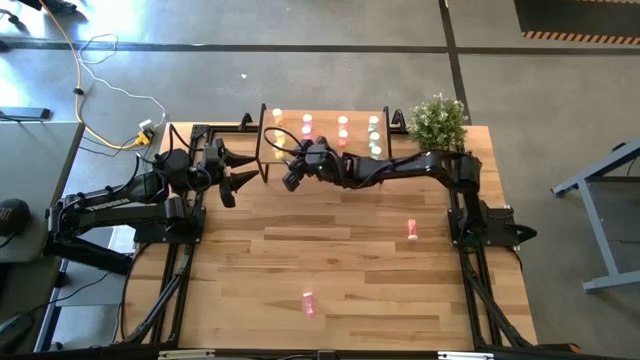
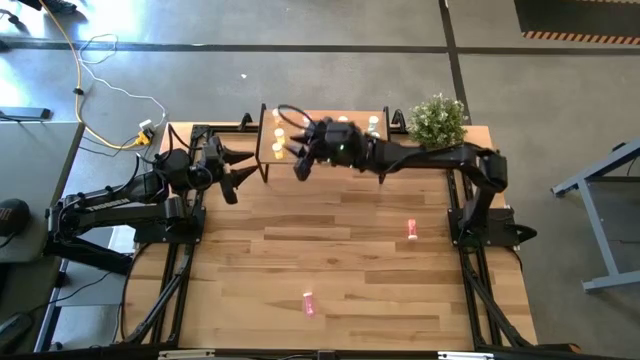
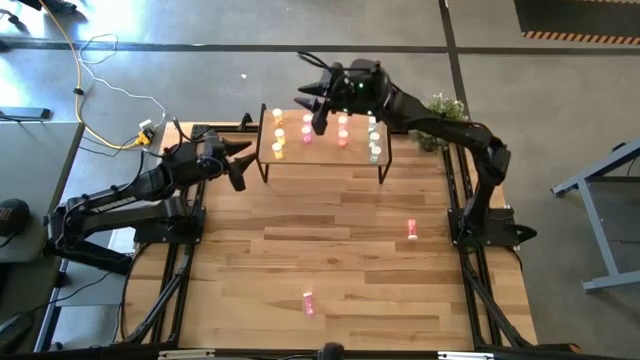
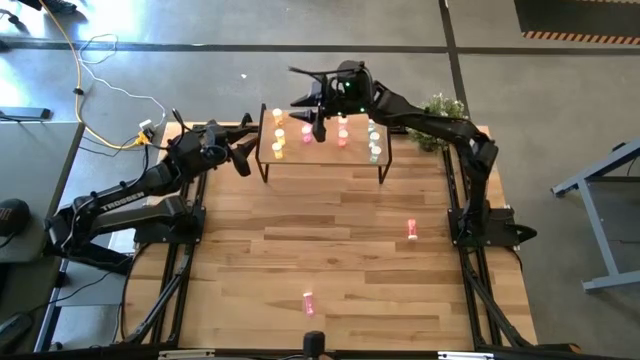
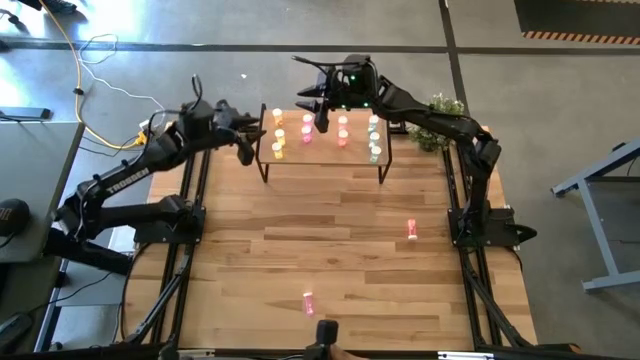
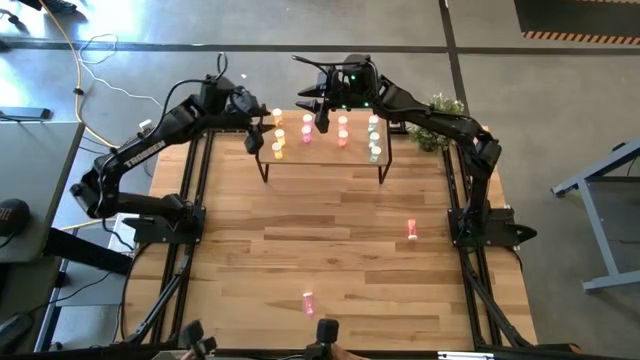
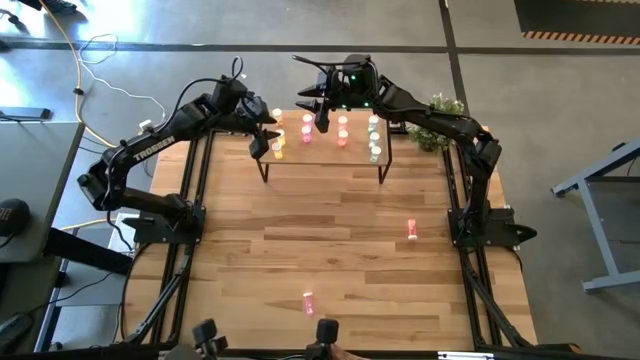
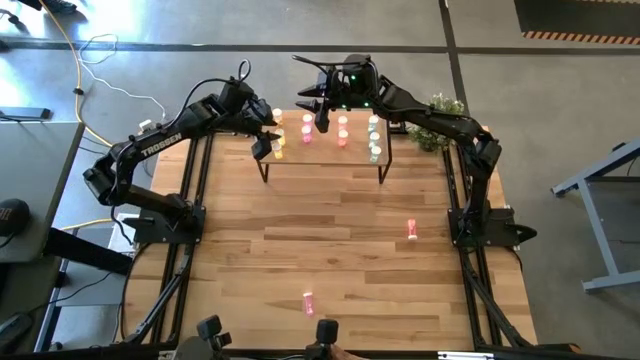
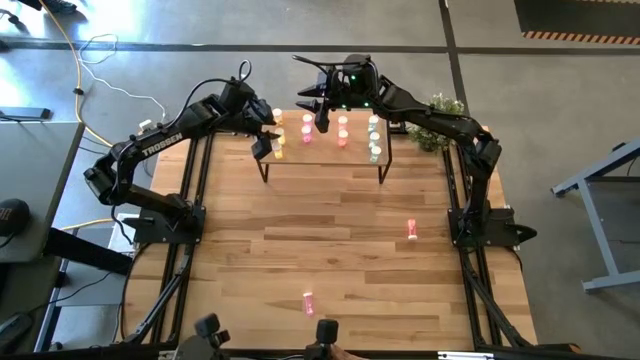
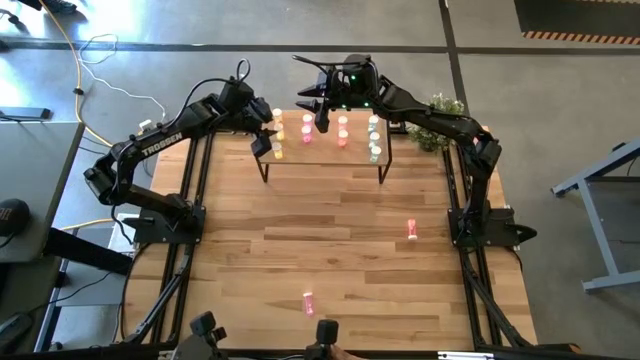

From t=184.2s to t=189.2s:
Task: Pick and place medicine bottles onto shelf by color
Adjust the yellow pill bottle on the shelf

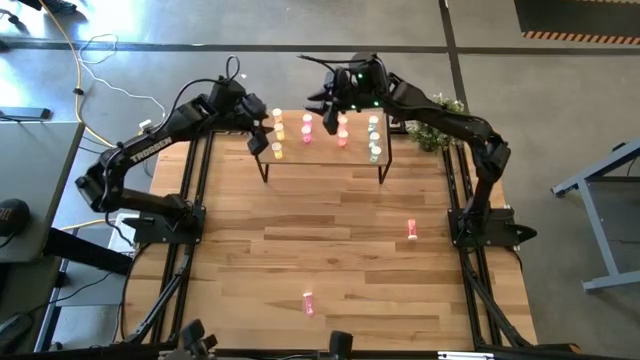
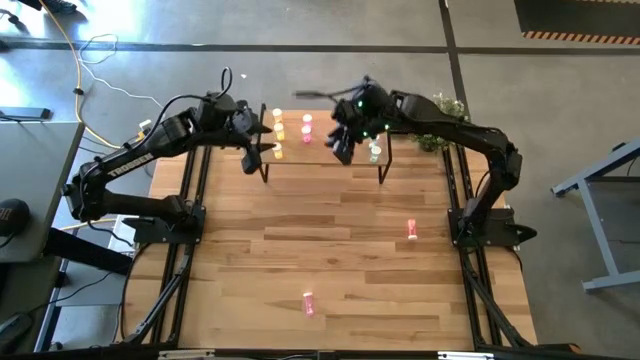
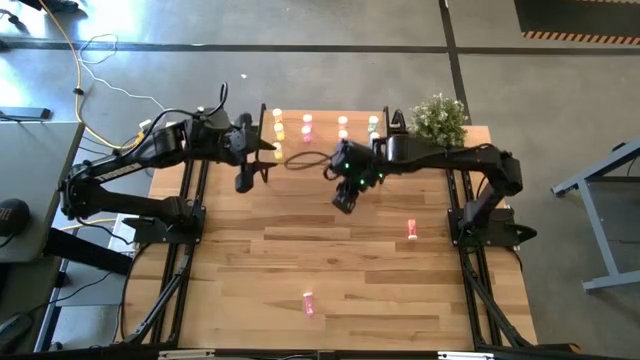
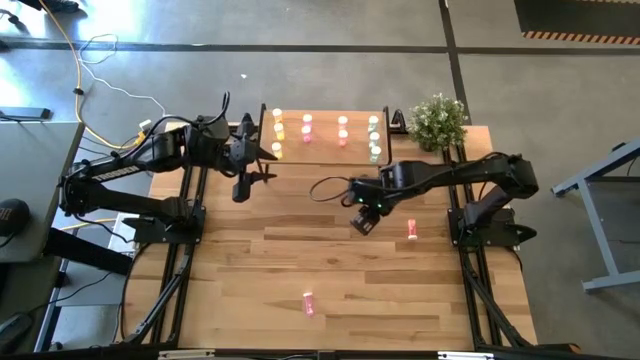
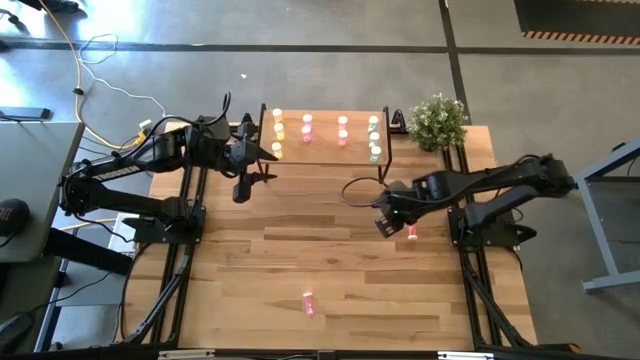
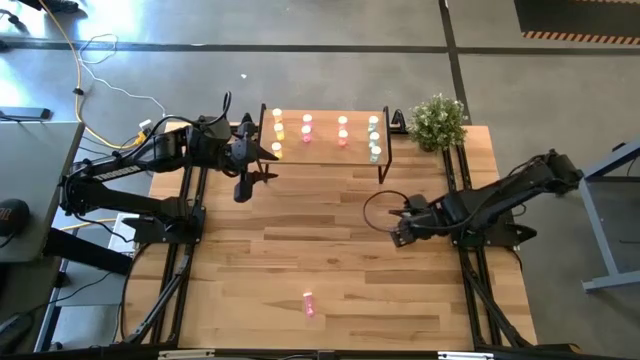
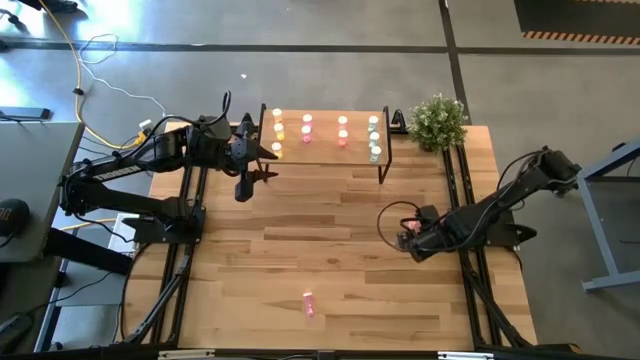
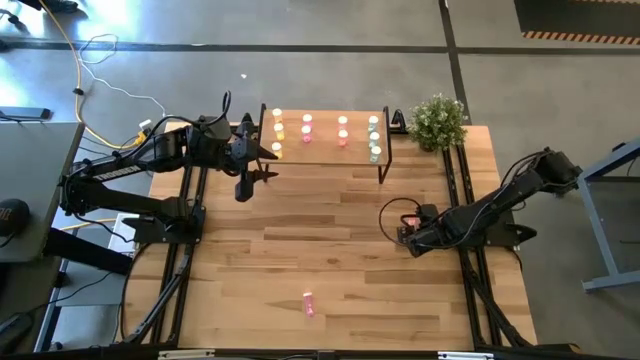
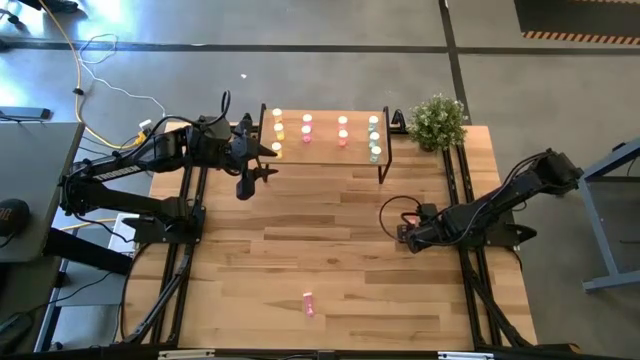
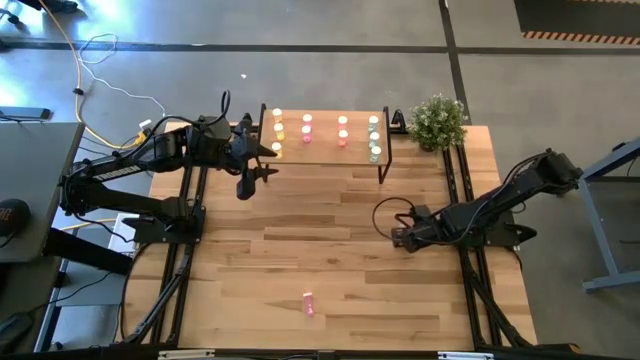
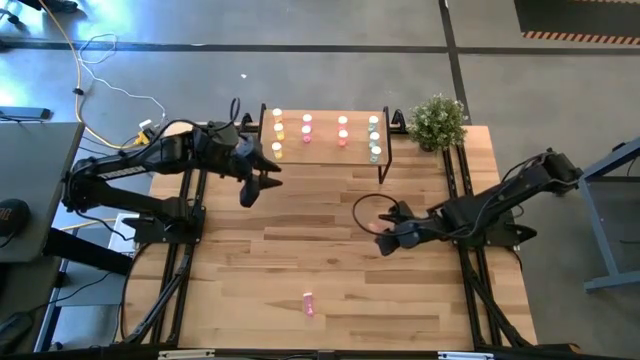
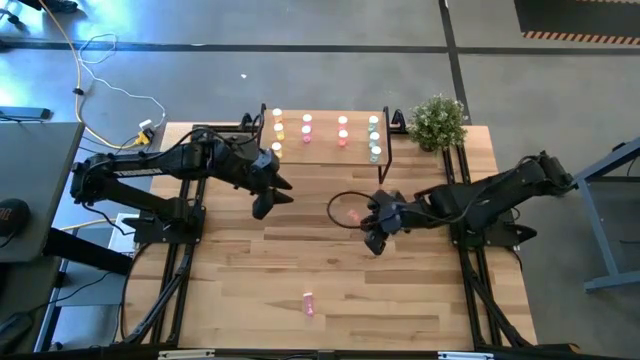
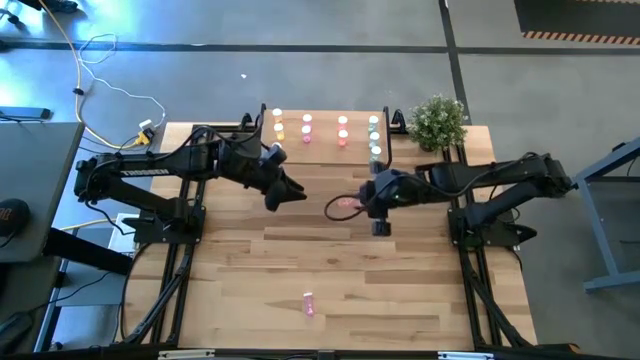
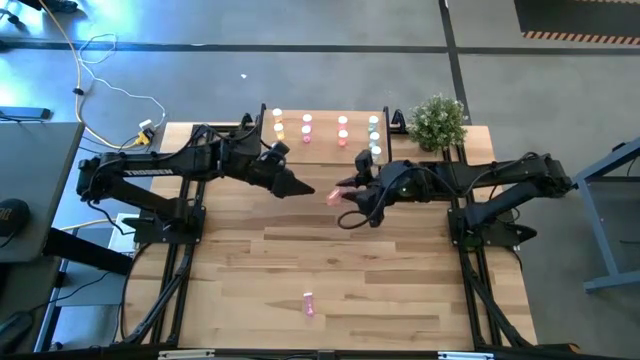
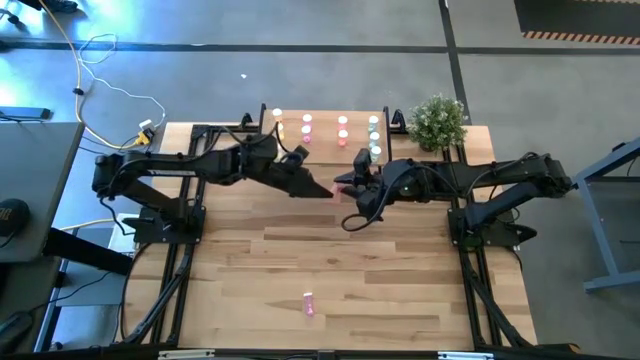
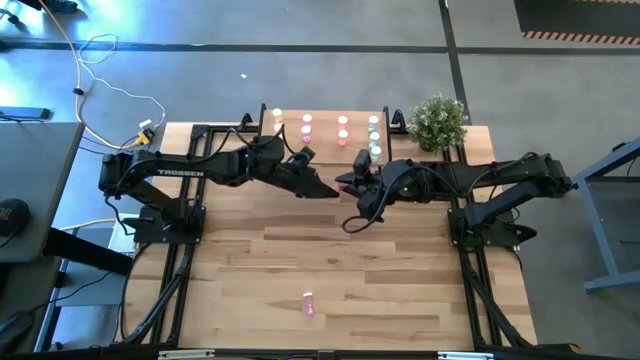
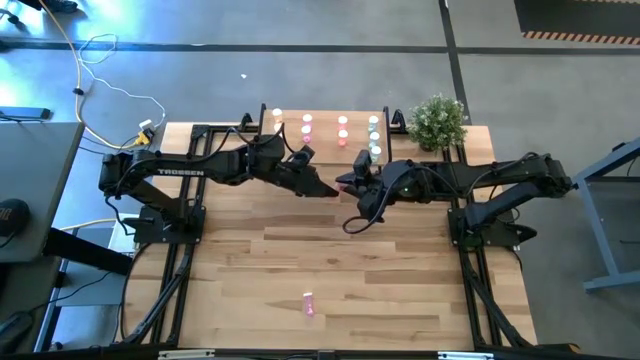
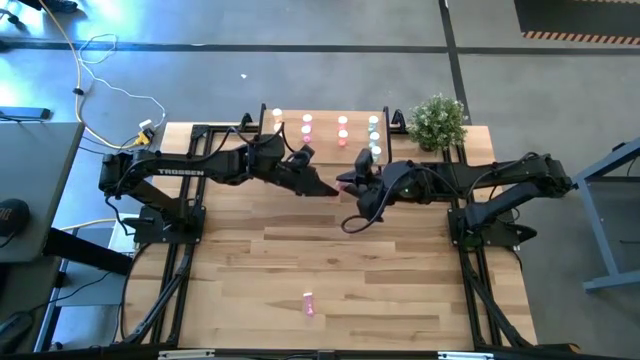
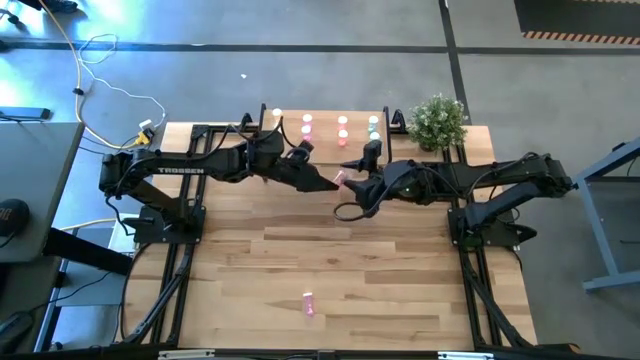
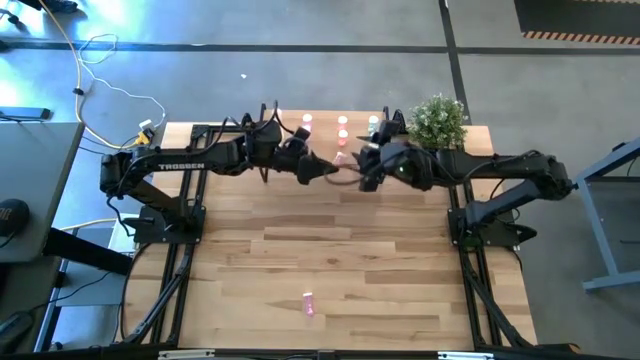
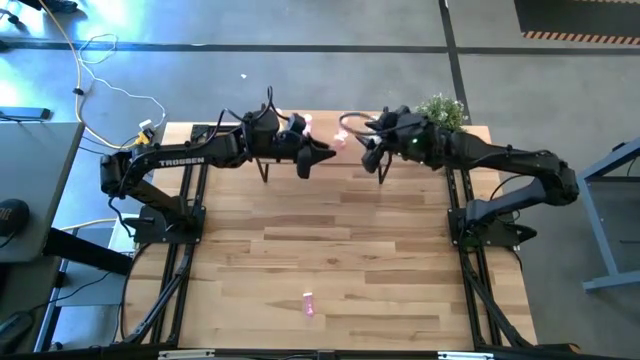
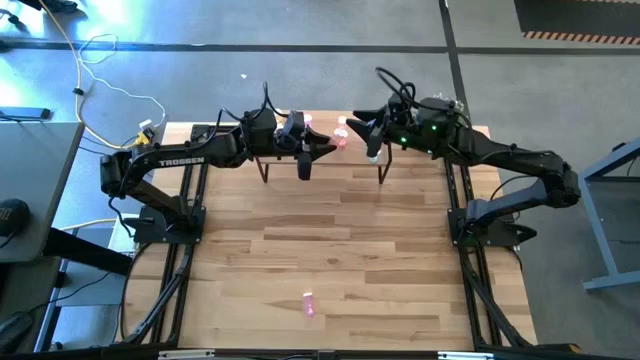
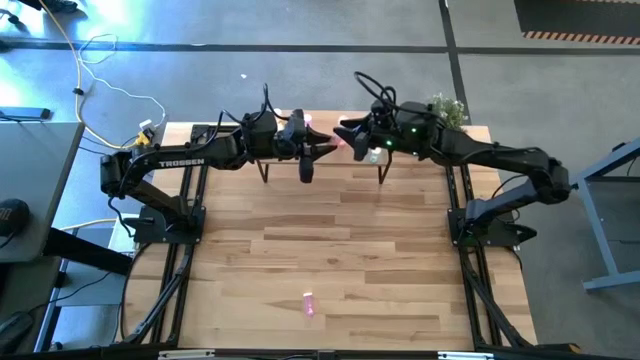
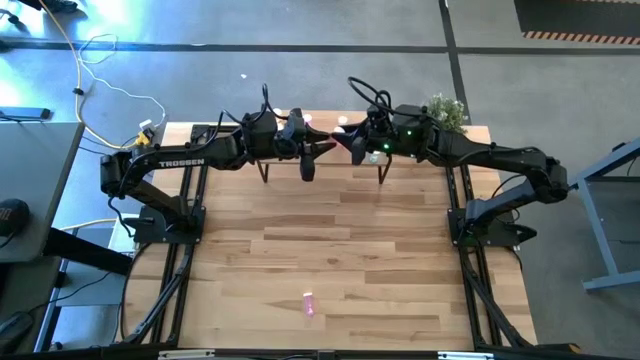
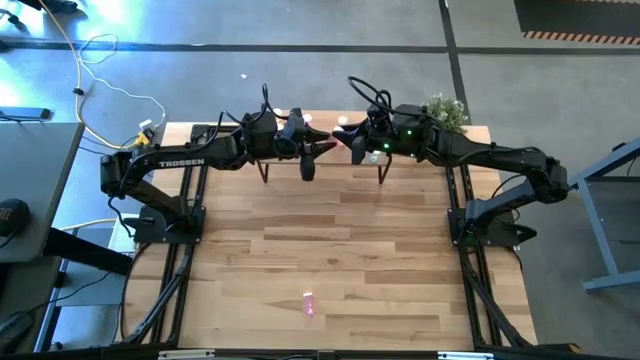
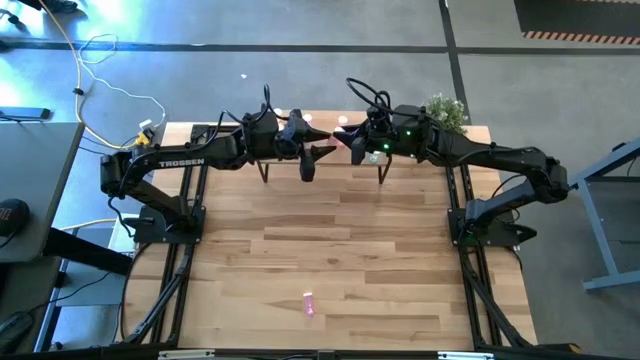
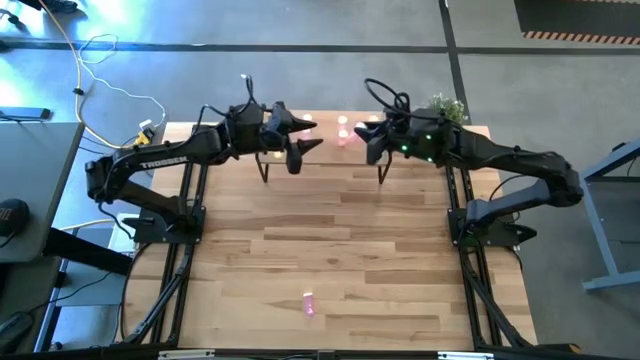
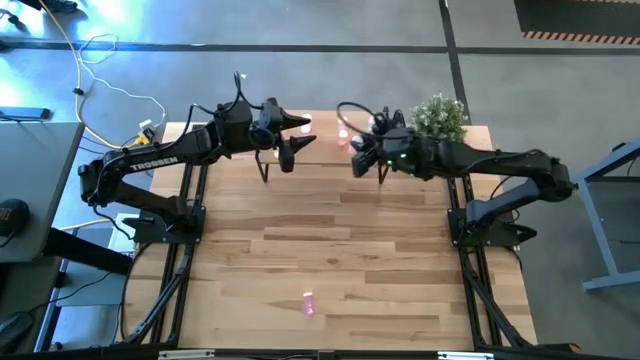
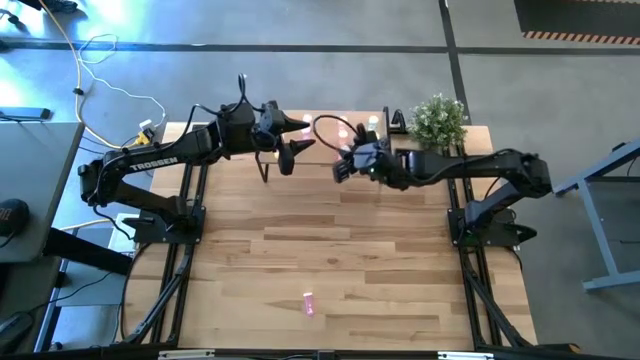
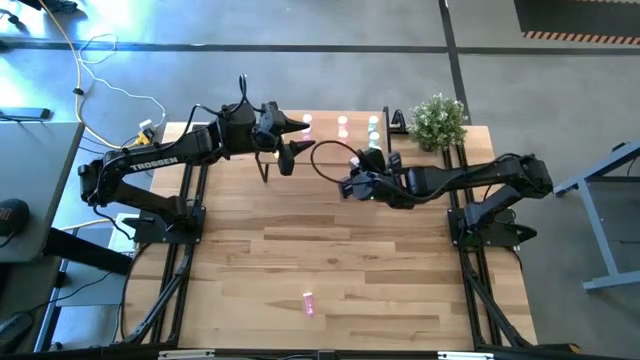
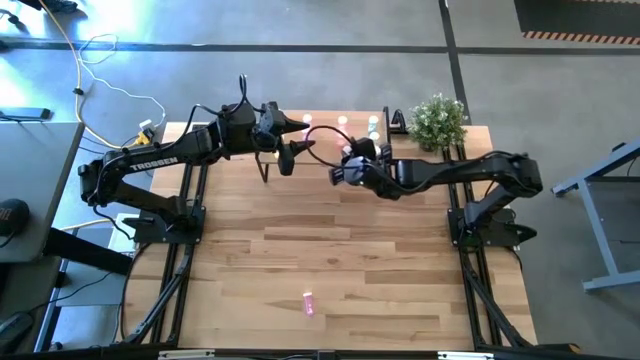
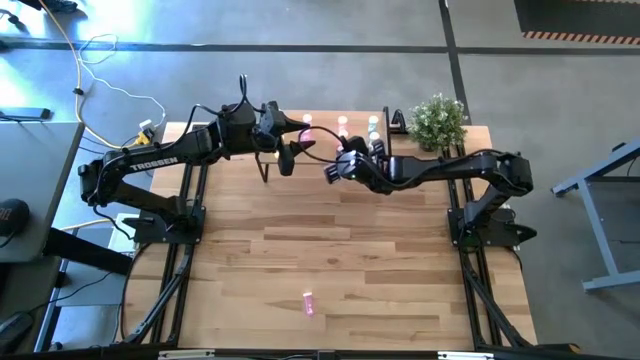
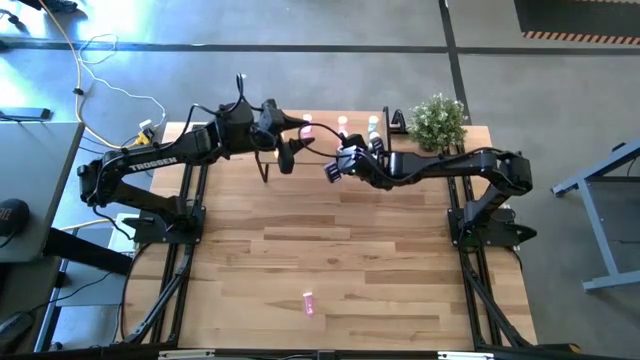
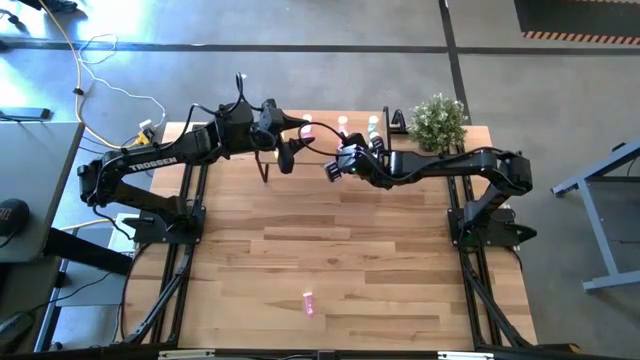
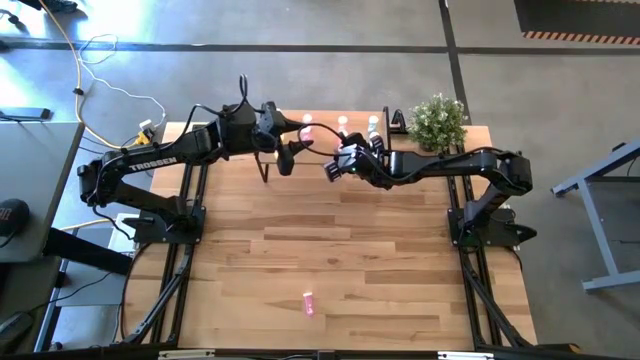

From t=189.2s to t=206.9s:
Put the pink pill bottle on the shelf aligned with other pink pill bottles
